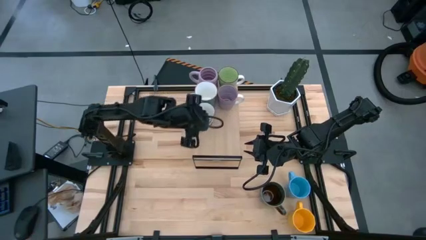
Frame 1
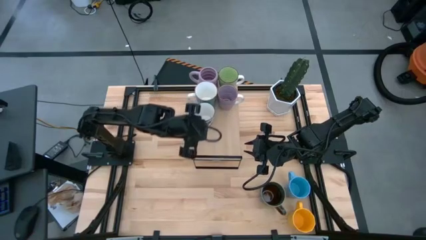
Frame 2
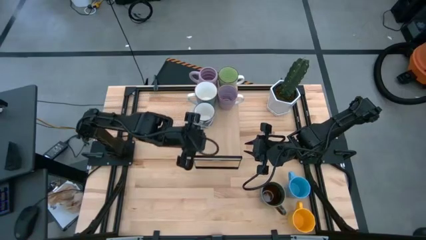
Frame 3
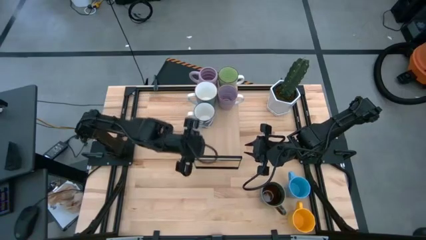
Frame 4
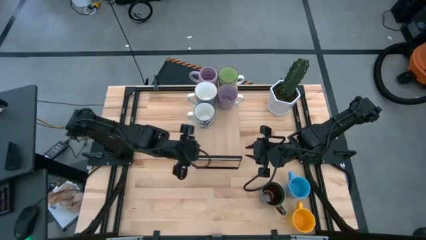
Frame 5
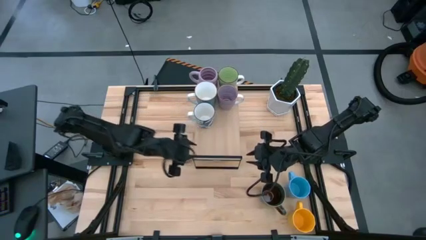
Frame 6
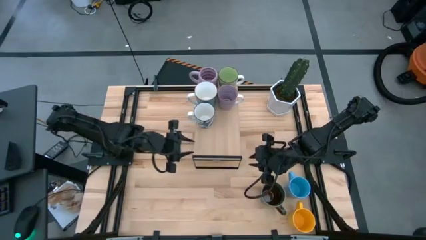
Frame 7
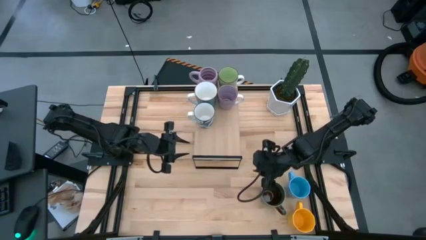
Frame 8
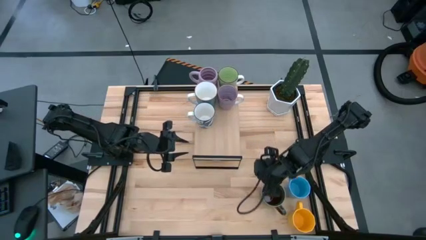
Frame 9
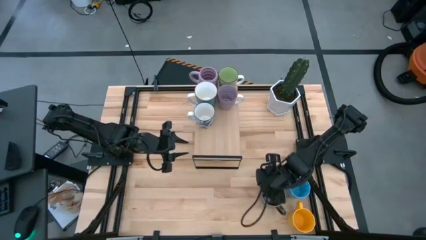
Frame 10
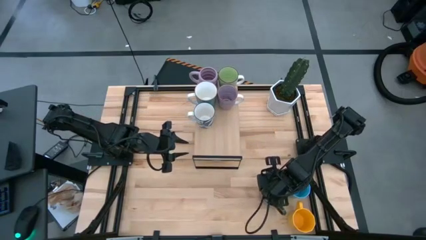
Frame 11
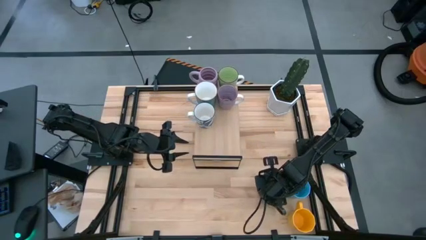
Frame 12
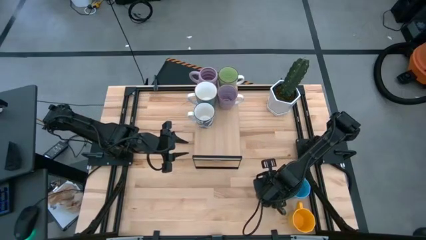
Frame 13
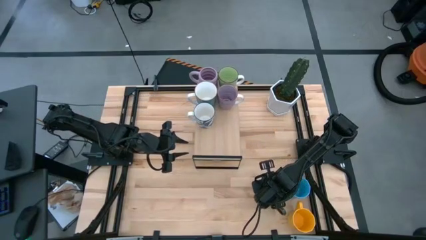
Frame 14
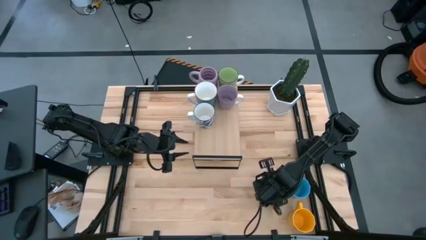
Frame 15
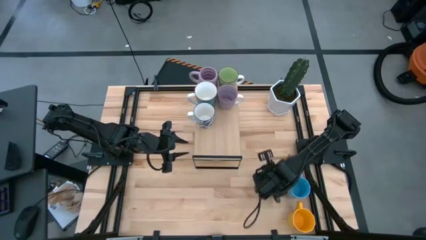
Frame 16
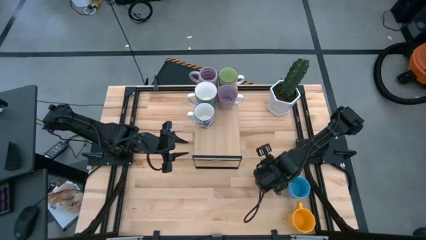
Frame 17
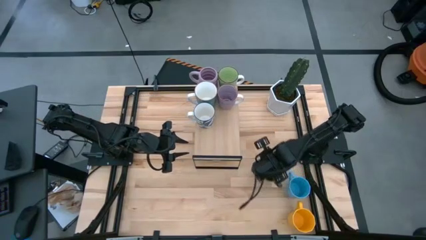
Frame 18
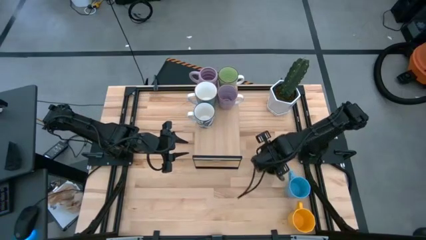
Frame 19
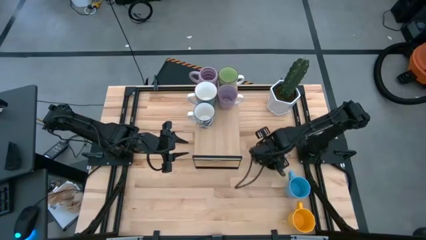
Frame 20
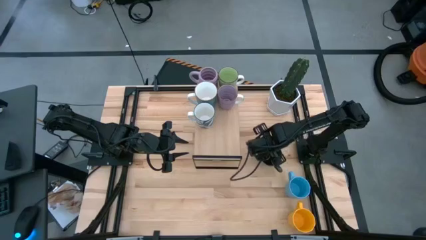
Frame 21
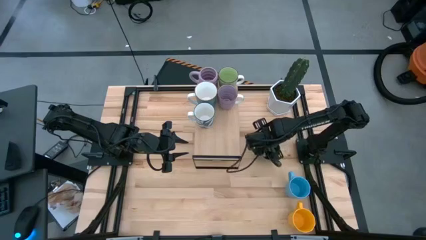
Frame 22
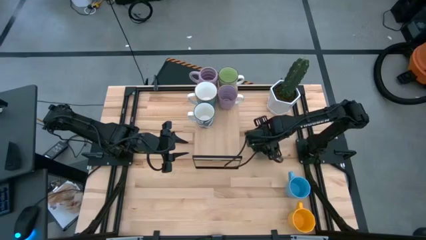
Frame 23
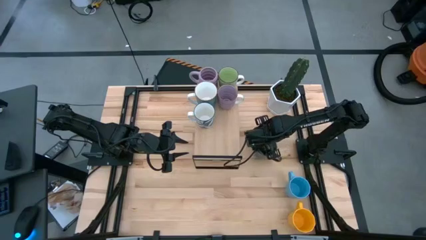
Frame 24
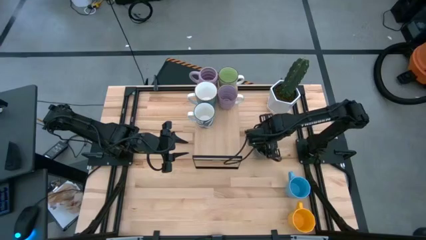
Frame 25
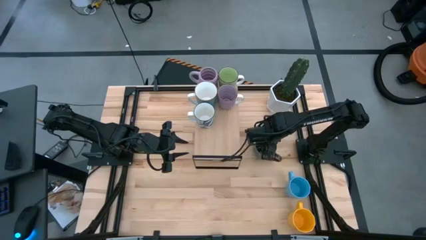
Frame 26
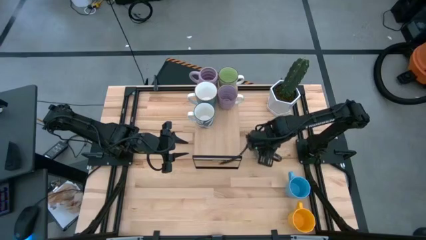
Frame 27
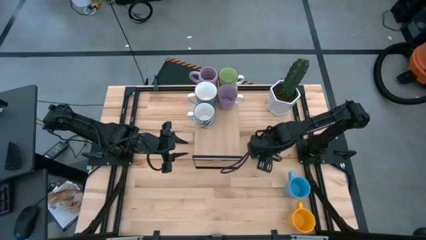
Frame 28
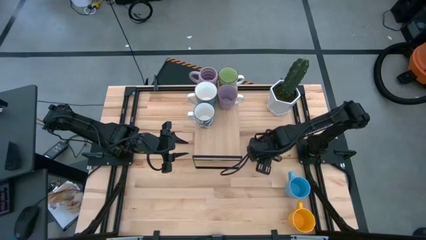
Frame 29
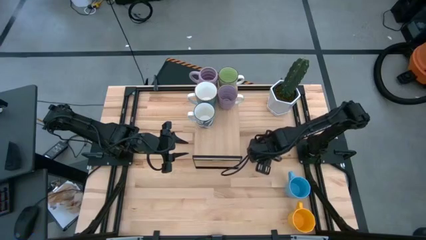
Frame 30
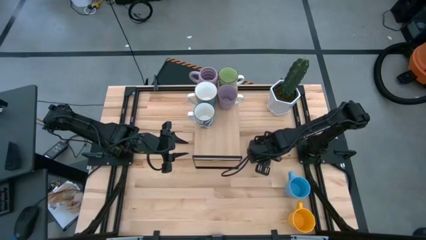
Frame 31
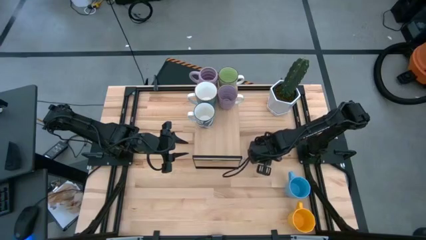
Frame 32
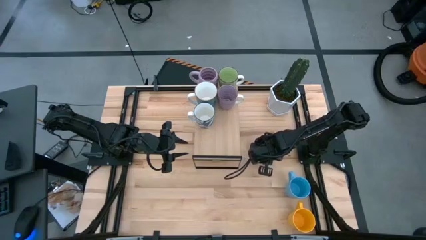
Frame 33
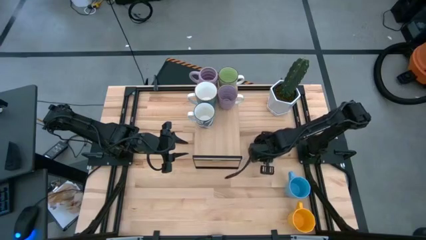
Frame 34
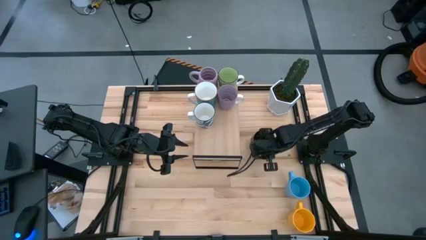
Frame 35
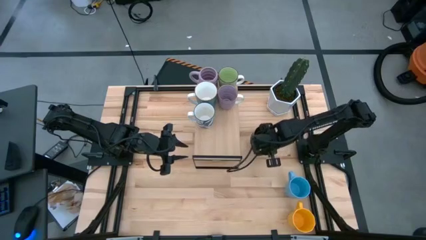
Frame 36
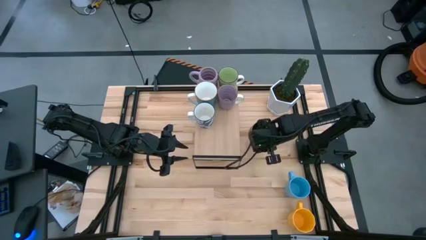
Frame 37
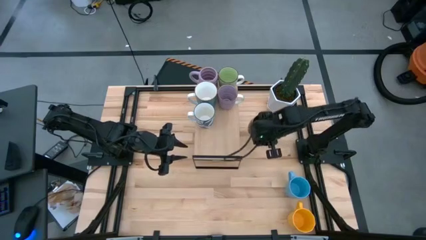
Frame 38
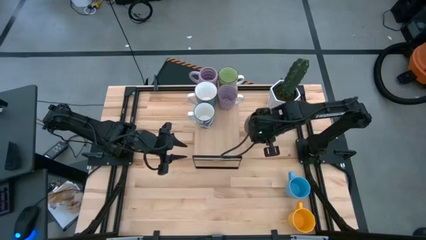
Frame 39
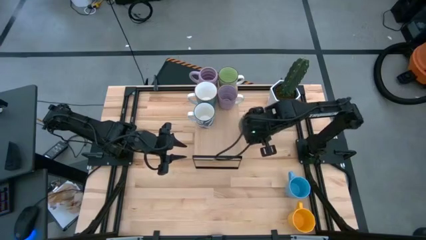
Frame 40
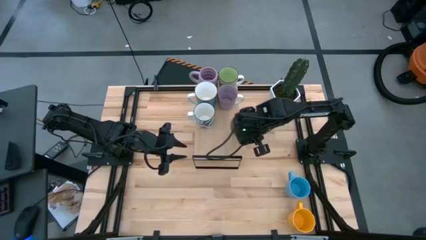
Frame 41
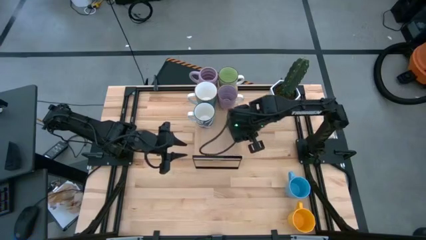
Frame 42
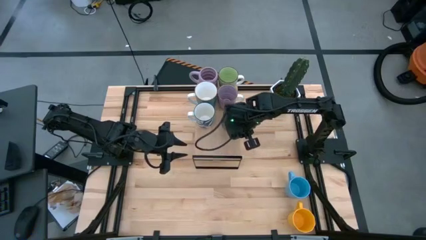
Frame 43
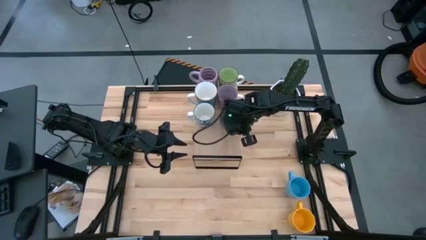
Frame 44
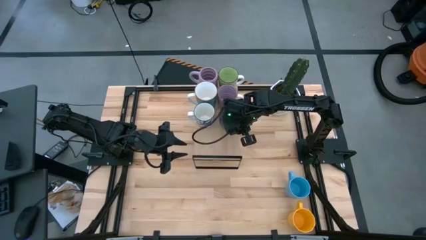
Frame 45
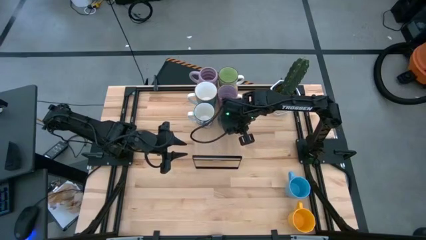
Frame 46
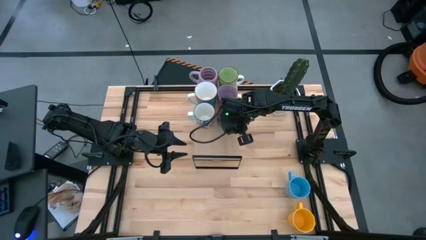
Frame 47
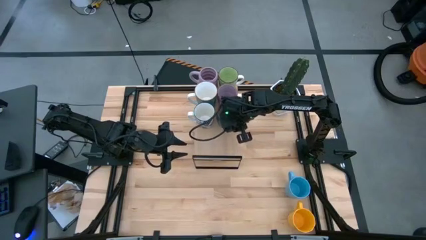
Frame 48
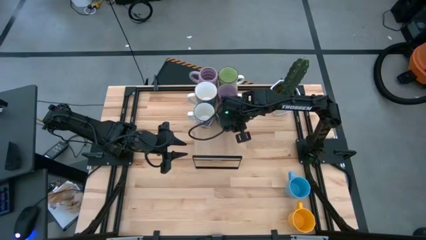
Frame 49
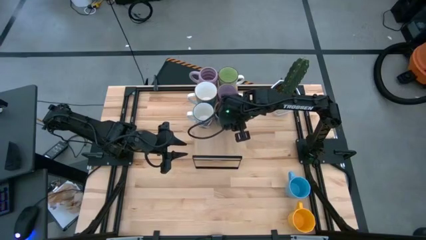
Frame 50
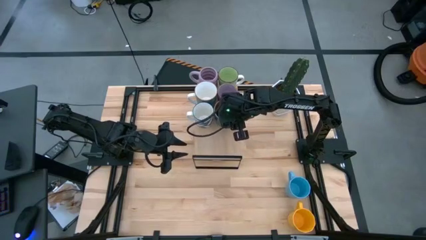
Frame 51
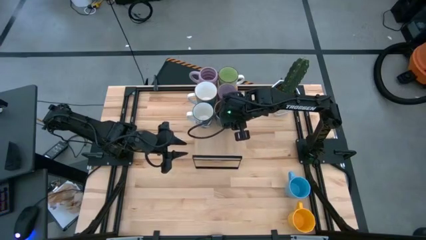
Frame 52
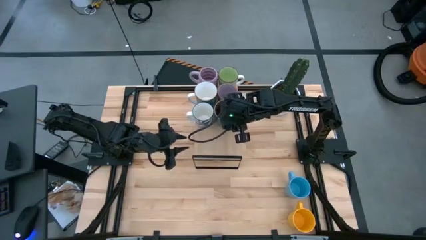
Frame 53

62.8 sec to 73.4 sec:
Task: Place coffee mugs
Put the green-brown patterned mug on the shelf

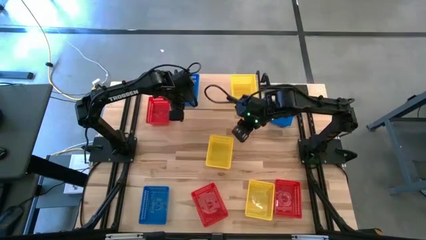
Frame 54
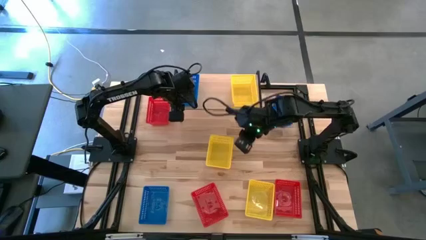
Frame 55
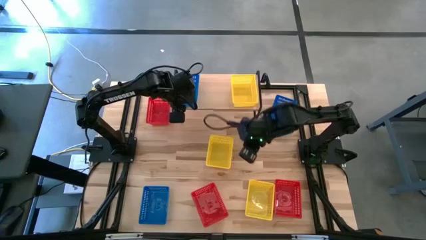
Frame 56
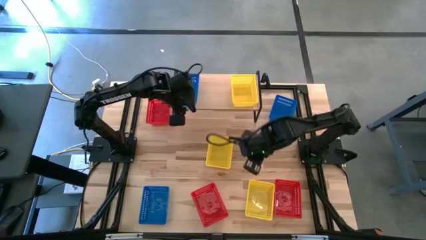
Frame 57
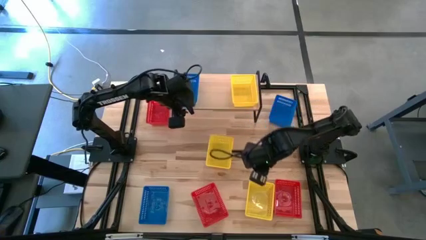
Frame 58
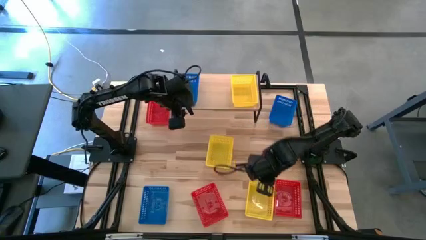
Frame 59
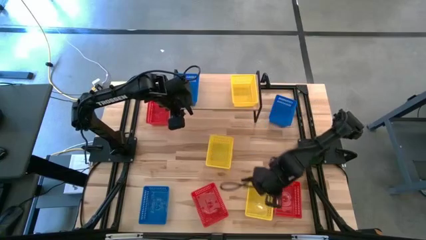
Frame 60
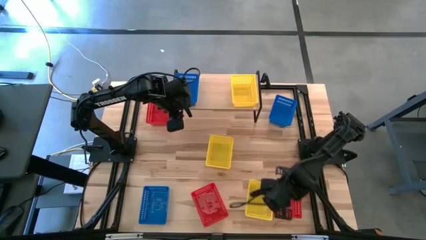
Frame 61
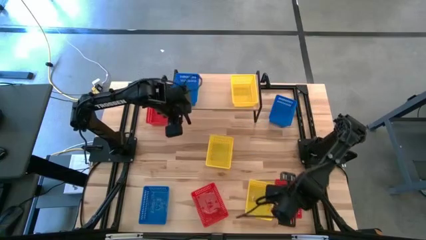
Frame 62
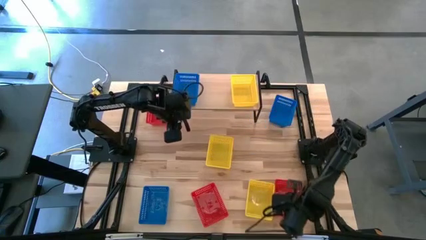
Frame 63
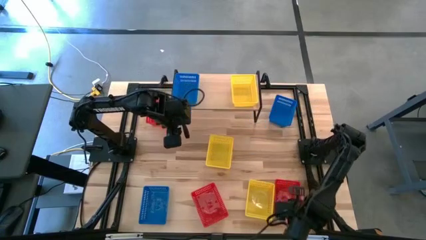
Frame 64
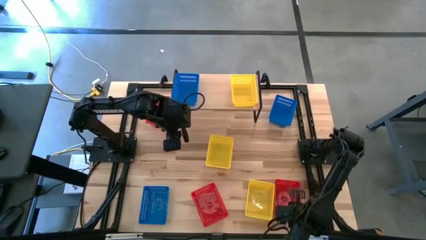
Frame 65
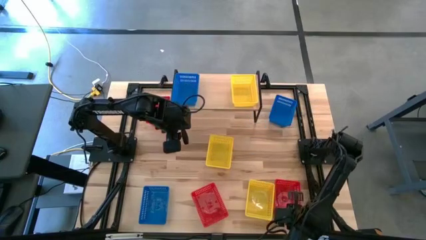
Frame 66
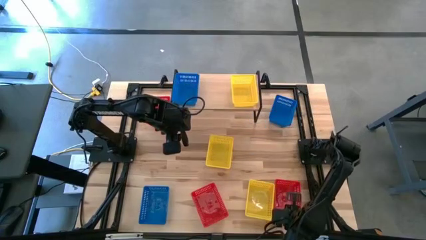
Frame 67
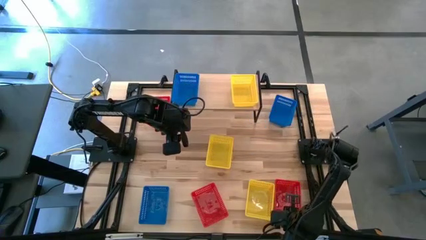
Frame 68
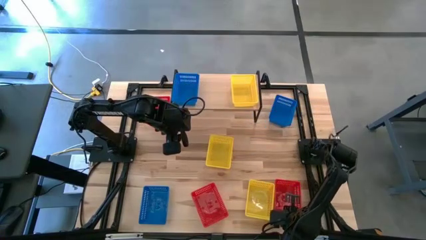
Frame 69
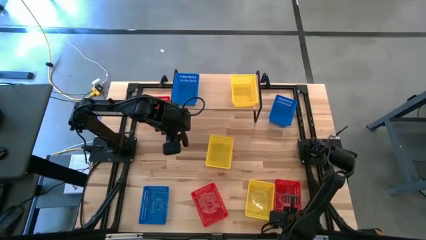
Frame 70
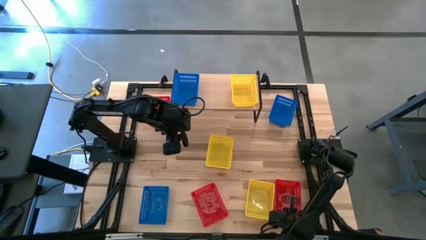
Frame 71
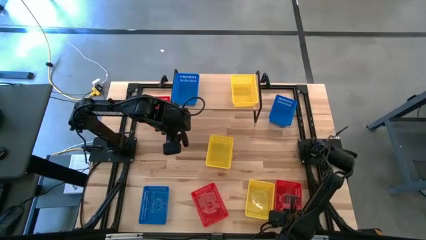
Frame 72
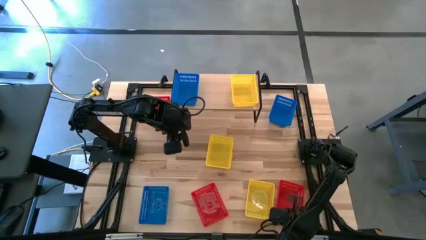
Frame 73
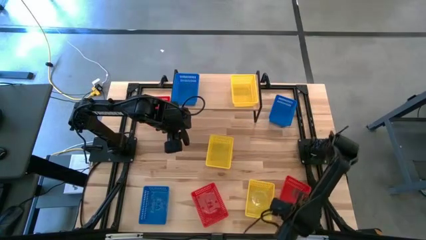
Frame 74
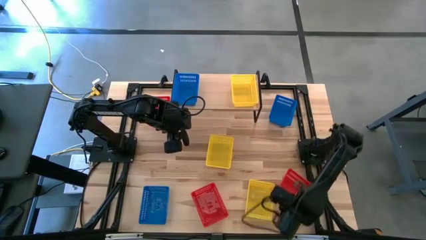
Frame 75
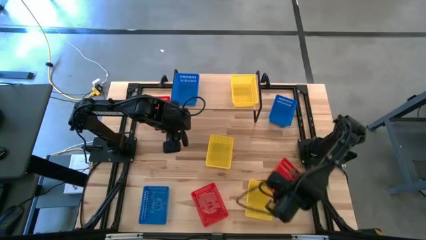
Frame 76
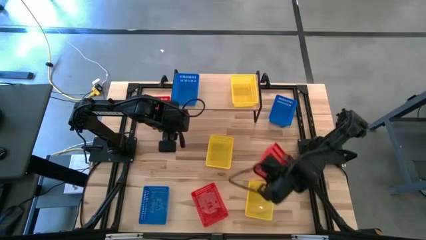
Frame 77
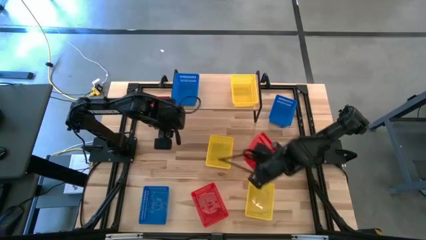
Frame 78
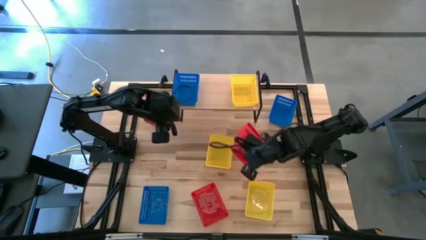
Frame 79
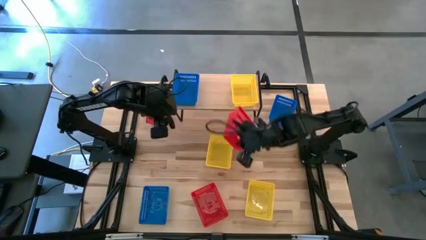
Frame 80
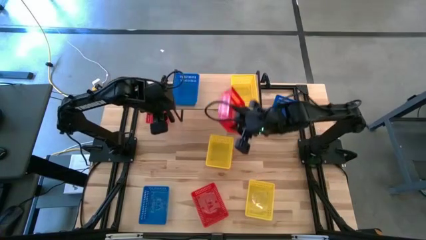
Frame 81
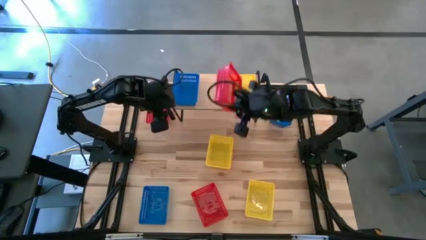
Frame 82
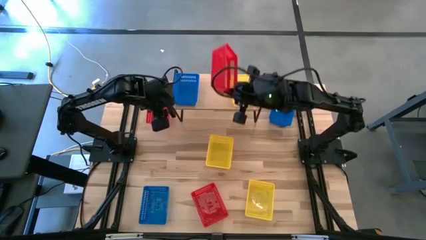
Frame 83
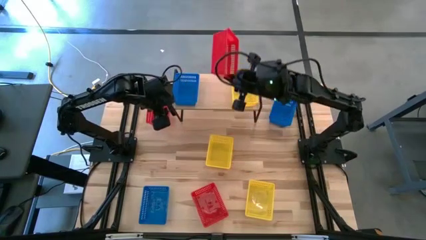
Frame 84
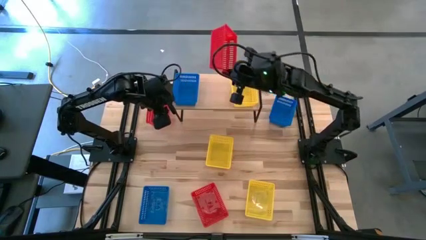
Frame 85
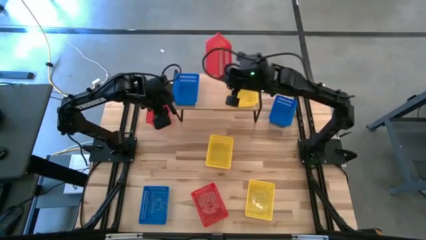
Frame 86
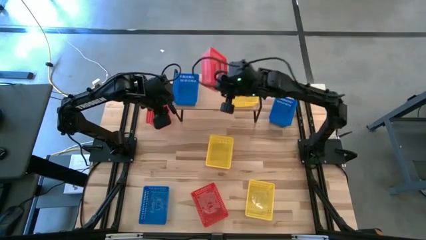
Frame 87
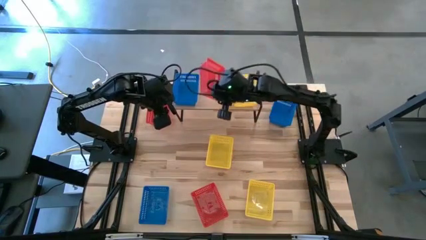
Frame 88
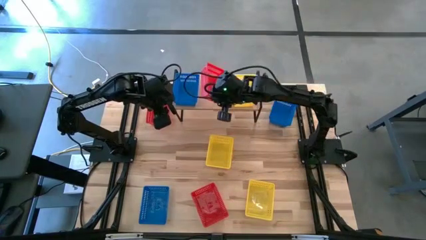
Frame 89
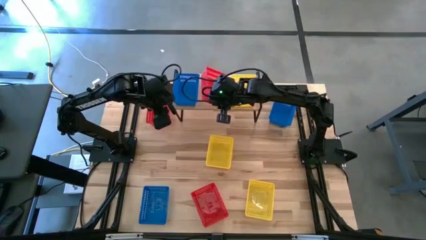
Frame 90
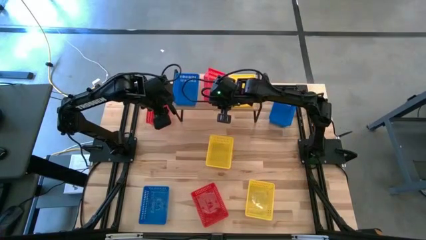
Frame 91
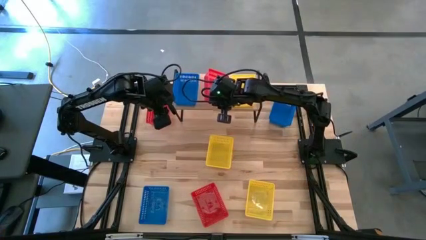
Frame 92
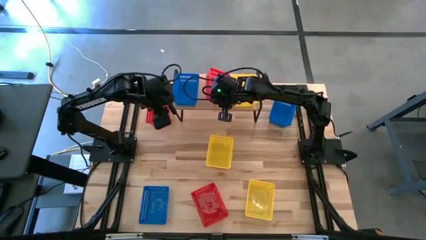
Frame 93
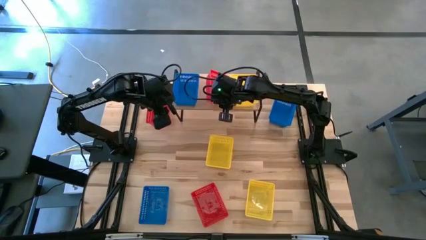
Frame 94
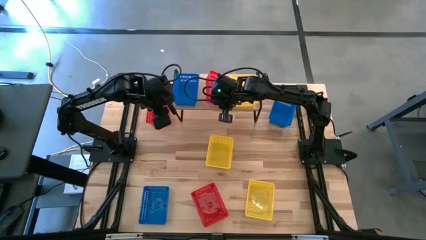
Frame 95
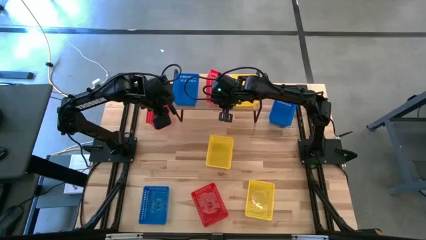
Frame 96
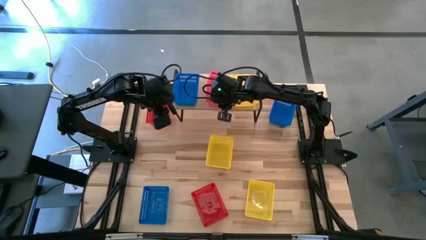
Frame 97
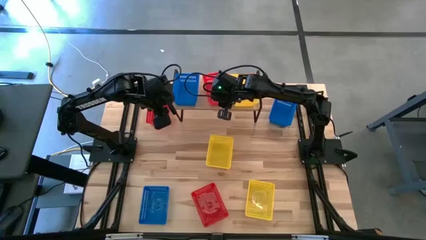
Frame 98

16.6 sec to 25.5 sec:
Task: Stack baskets on shelf by color
Put the right red basket on the shelf
